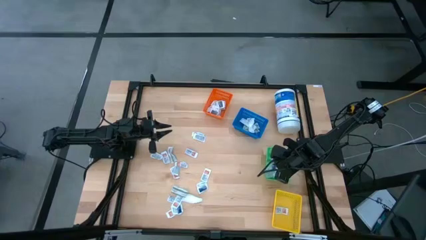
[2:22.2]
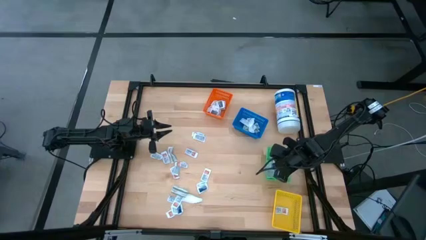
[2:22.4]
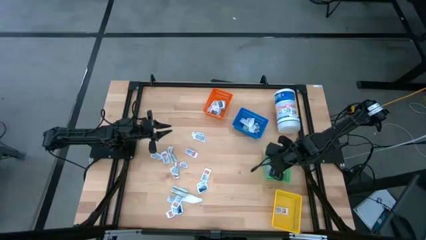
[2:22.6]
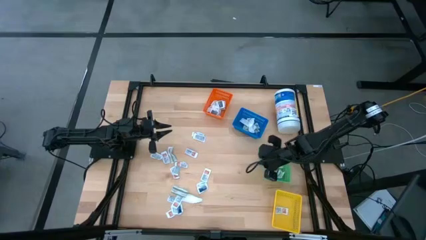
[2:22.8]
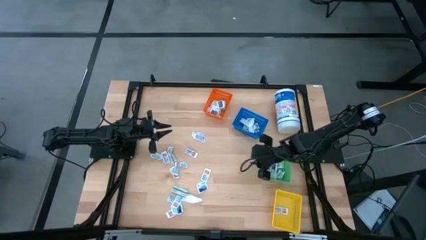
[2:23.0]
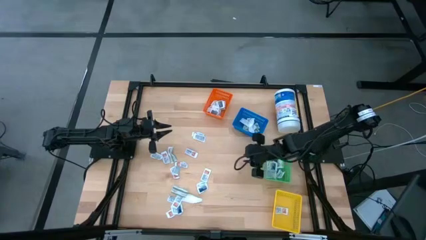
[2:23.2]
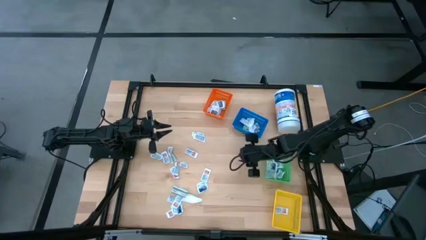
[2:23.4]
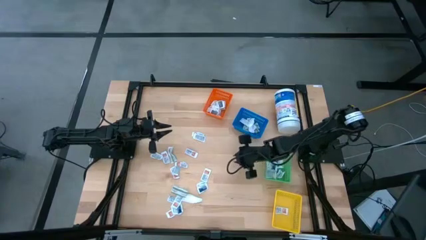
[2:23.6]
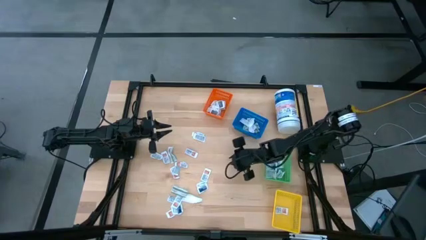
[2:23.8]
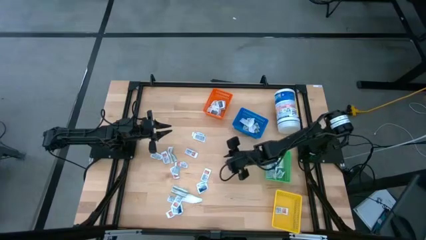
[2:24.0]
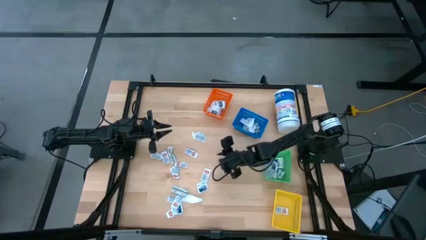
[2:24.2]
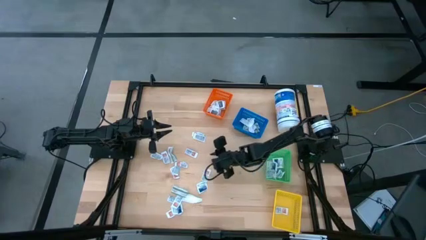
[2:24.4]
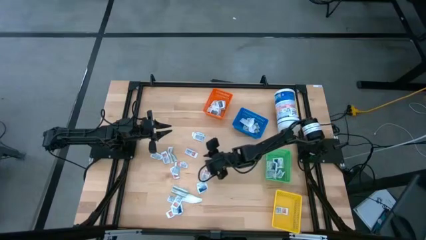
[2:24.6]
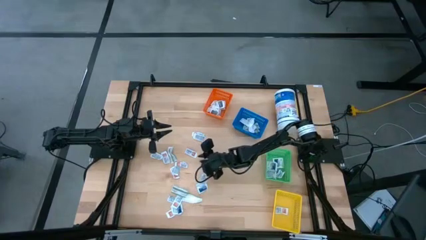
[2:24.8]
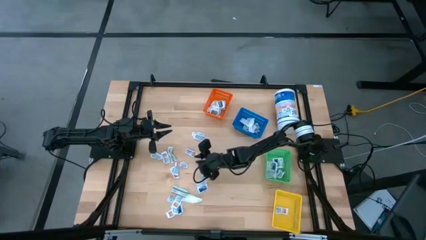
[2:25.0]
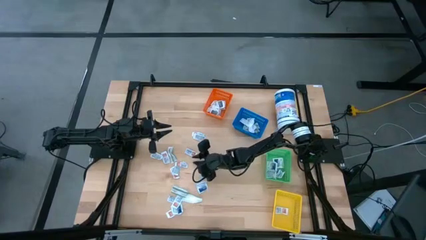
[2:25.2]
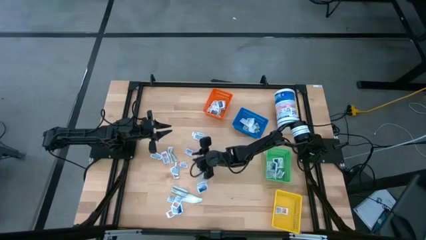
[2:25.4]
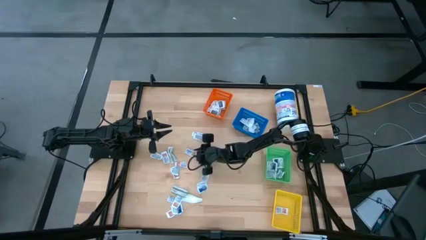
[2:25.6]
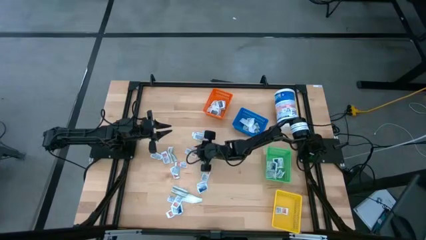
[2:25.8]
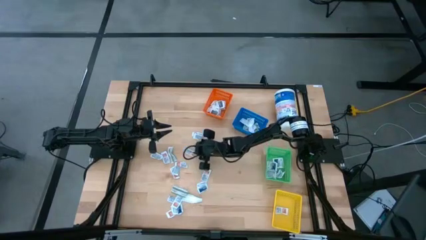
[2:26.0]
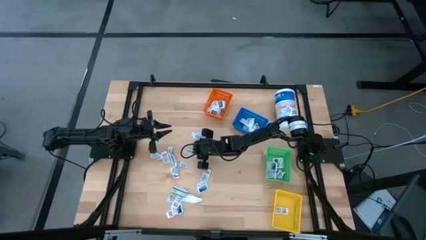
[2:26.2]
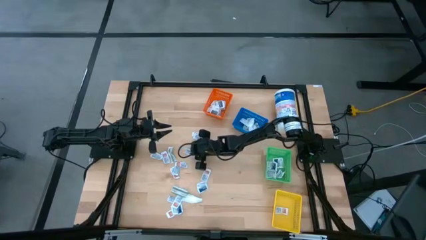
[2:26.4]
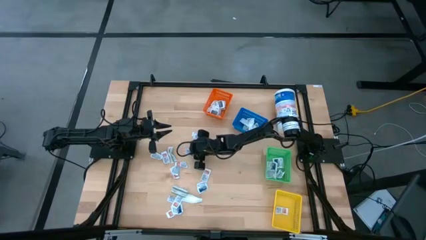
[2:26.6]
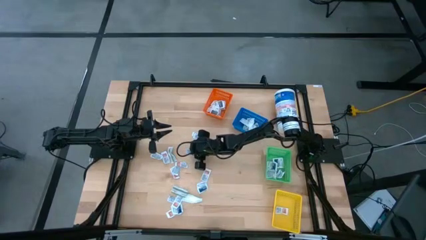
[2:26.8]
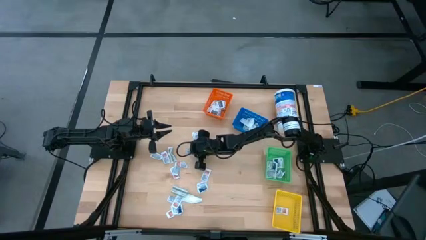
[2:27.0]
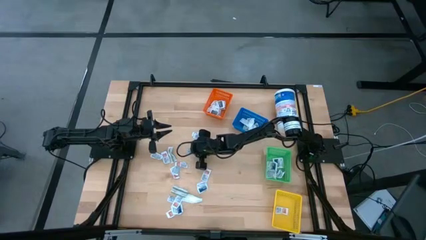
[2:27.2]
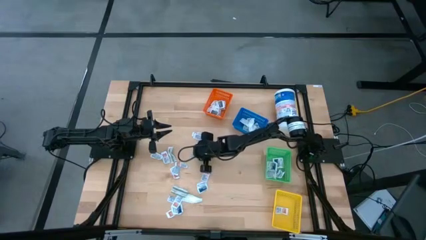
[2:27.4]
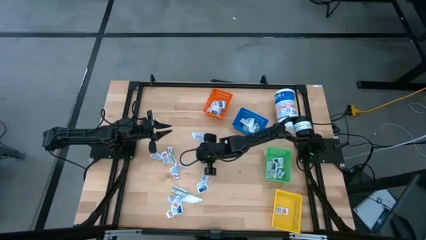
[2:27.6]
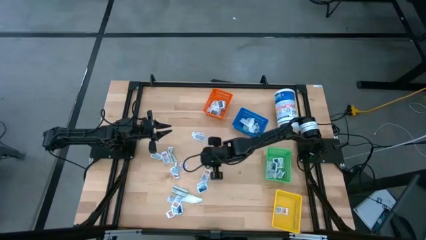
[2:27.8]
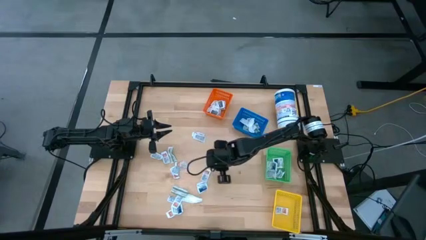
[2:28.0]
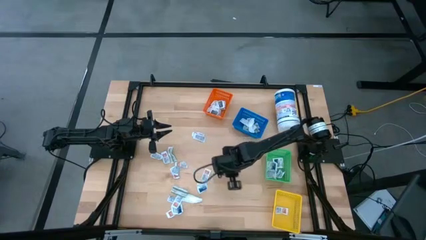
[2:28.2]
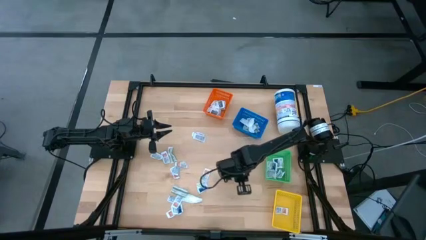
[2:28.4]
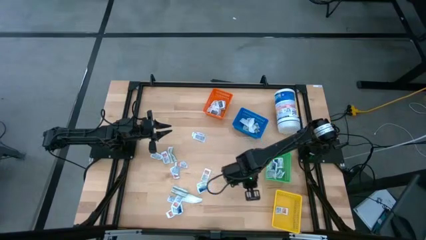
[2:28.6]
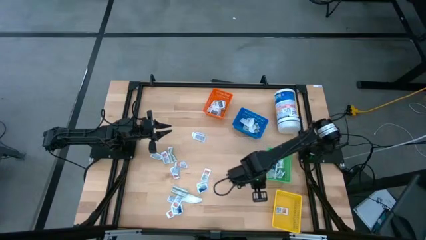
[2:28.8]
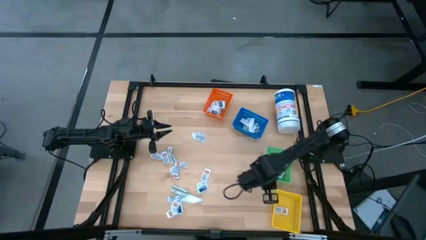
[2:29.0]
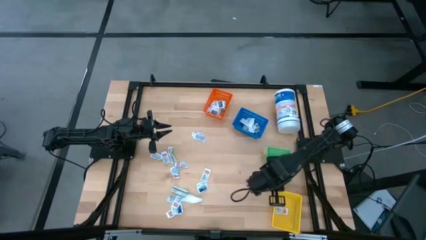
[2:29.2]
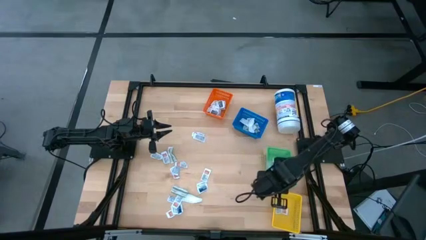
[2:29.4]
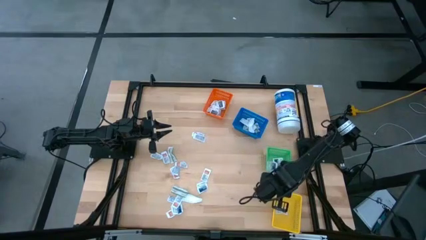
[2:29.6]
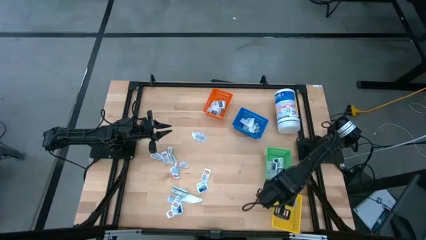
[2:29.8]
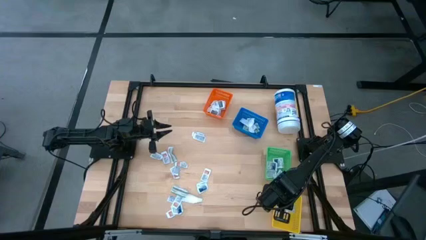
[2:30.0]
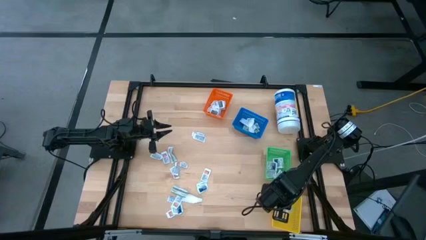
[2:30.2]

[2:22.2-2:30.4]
Task: Pick & Place First Aid Supplies
Put the orange ointment pack into the yellow basket

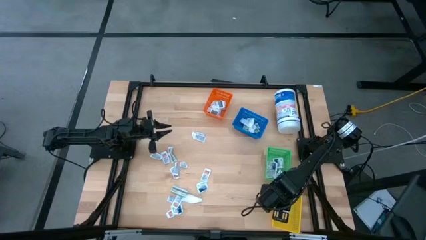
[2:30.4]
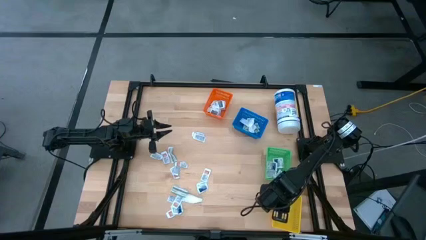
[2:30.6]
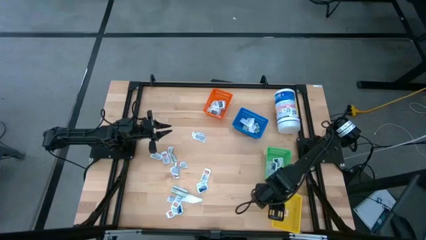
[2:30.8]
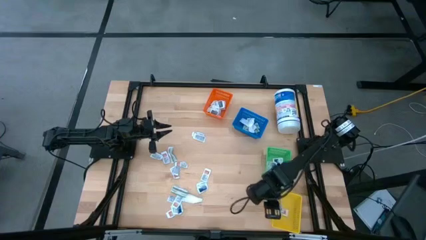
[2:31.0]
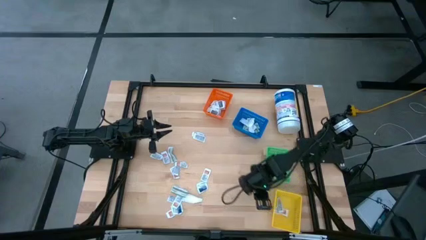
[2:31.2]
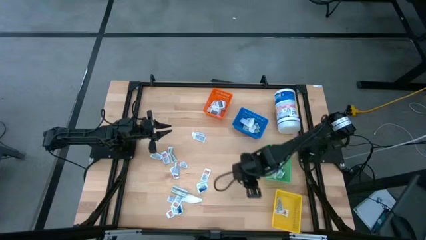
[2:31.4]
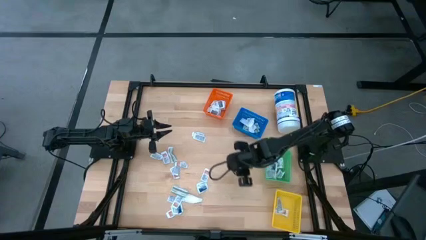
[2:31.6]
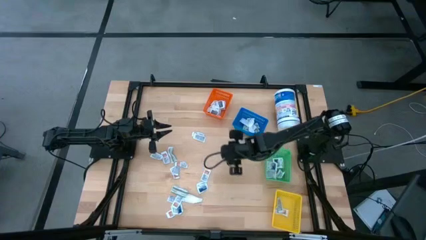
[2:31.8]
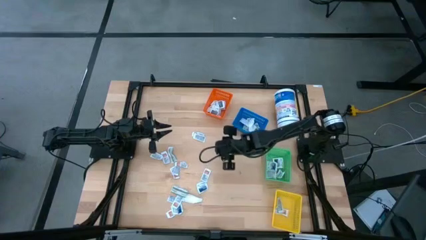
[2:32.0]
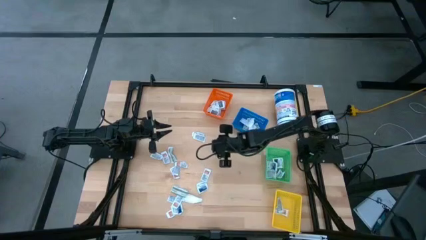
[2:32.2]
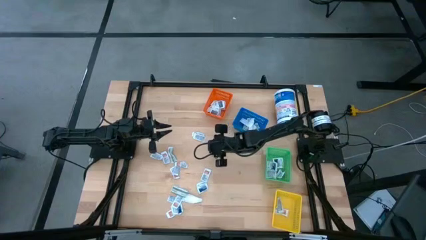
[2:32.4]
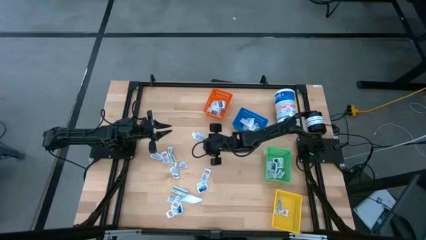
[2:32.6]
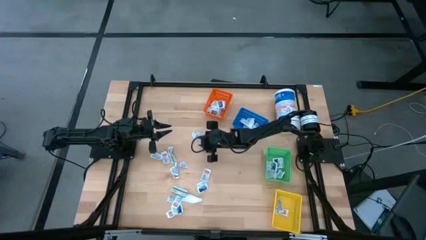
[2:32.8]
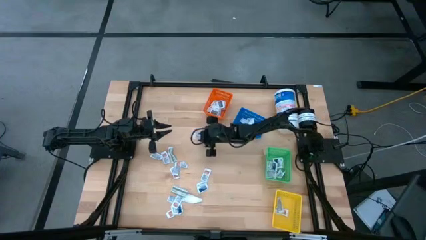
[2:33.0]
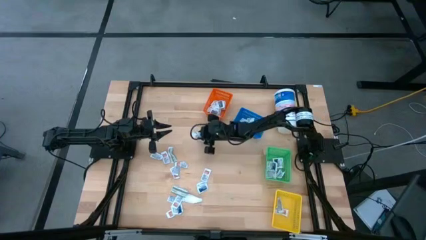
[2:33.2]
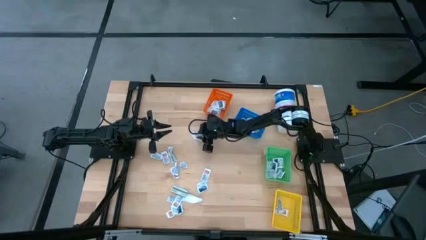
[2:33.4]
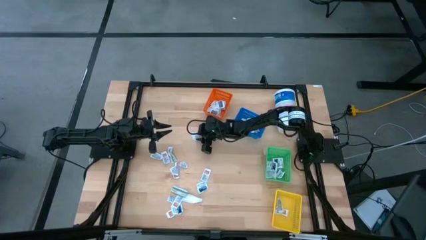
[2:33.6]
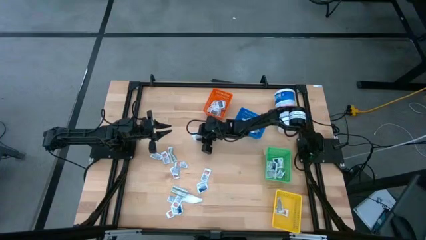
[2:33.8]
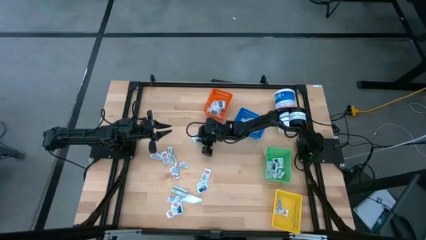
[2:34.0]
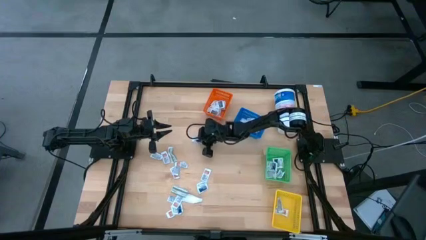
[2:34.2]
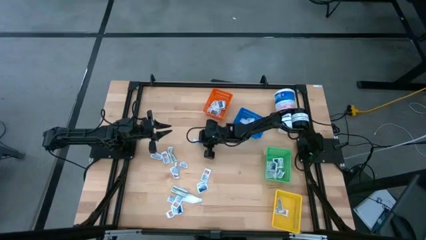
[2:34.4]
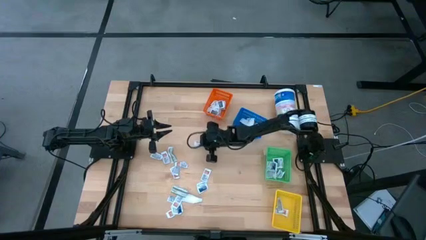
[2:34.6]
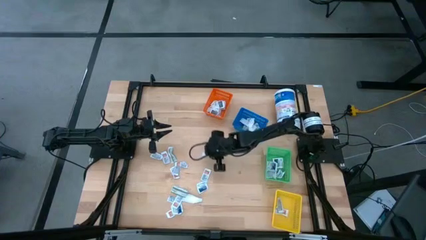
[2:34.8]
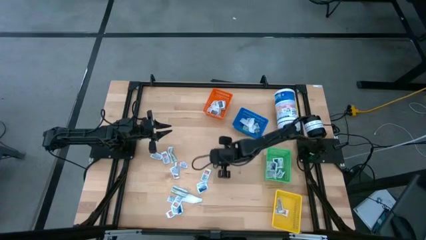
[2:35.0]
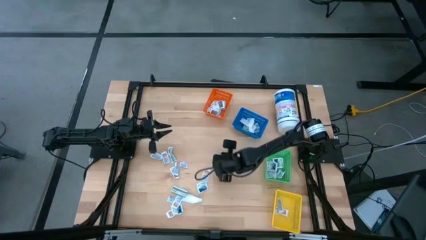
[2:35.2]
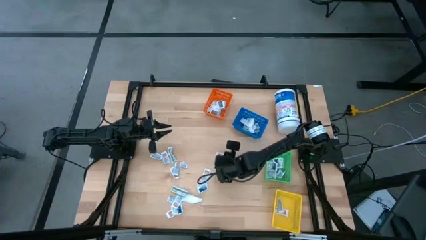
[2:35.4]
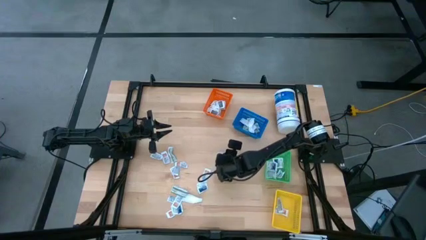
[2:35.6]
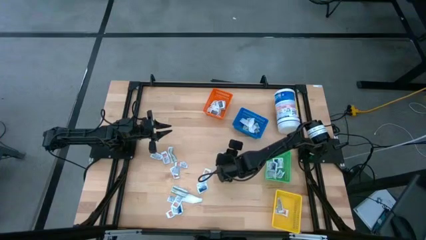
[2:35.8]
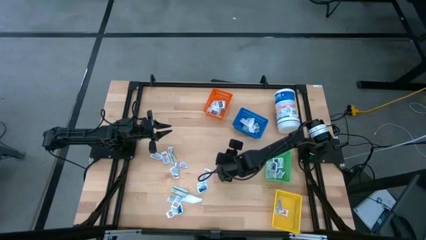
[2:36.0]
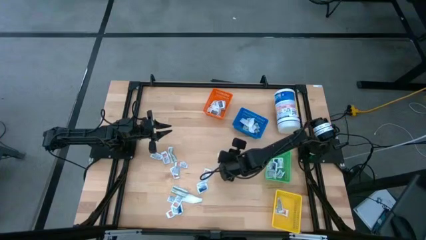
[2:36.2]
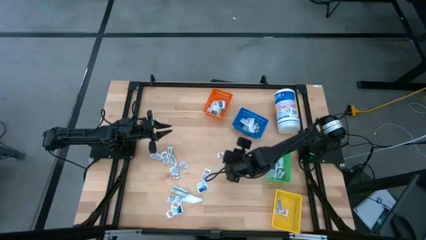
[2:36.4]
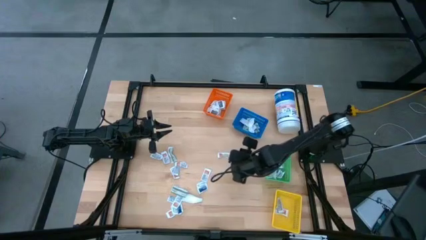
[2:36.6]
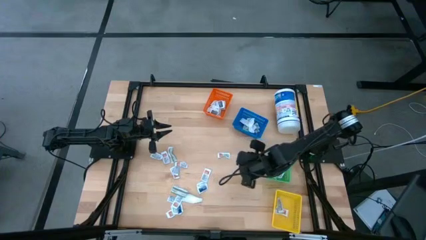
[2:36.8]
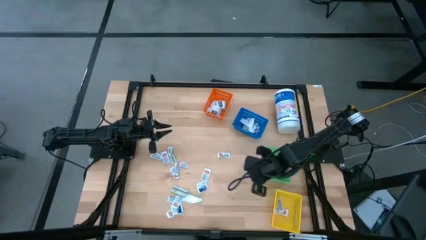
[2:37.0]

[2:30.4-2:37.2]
Put the orange ointment pack into the yellow basket

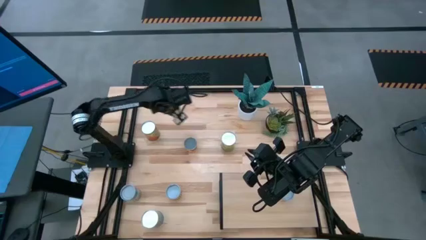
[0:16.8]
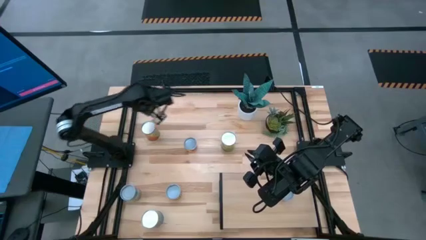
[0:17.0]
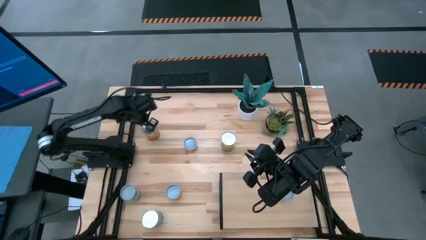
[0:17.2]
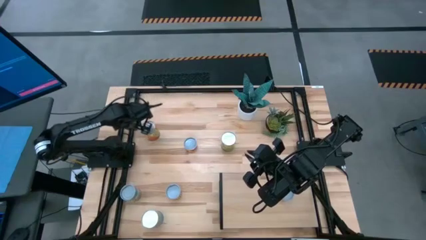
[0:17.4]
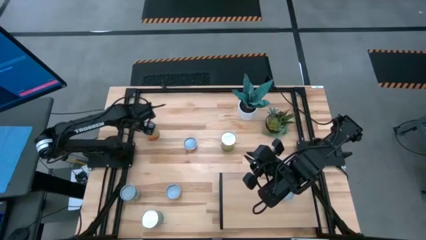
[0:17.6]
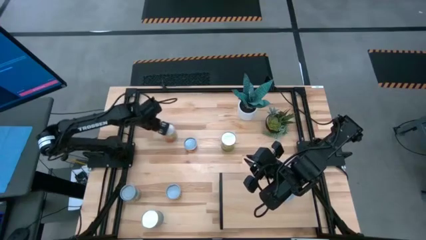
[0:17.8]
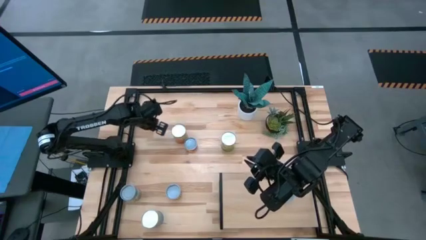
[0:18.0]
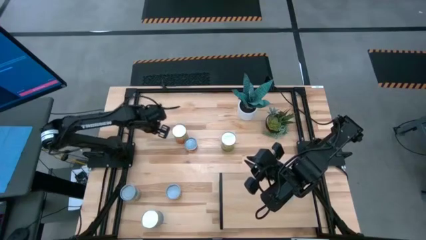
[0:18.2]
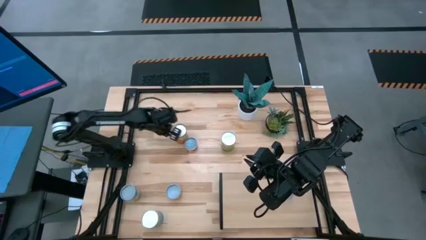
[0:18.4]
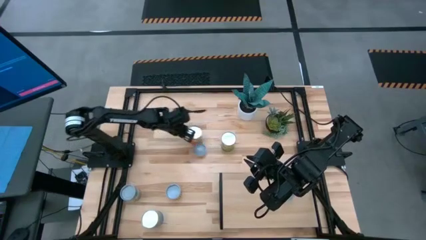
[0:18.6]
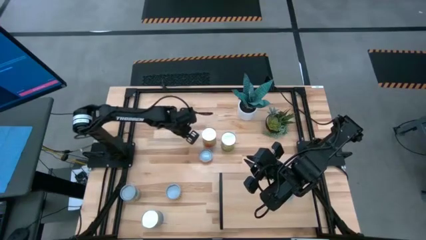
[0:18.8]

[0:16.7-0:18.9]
Task: Pick and place cans onto a shelf
Move the orange canned green beans from the left to the center of the table
